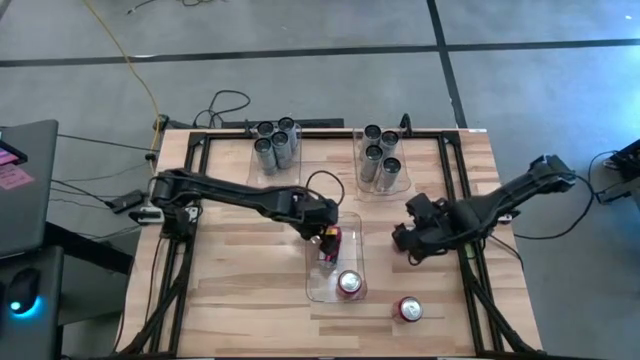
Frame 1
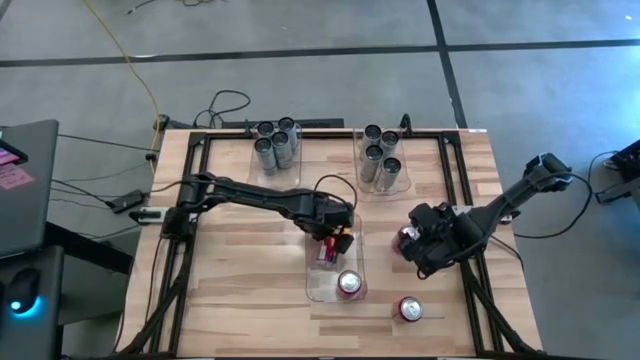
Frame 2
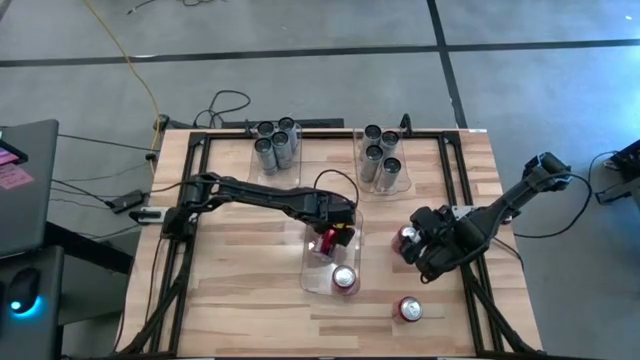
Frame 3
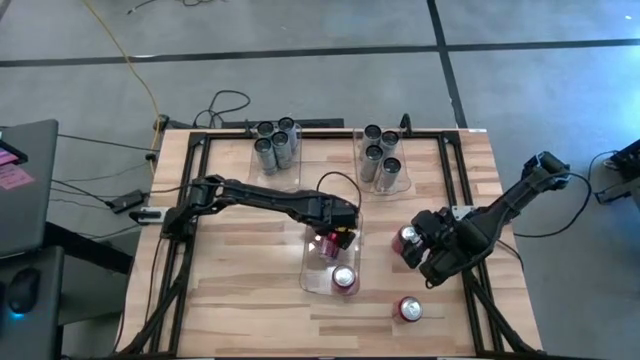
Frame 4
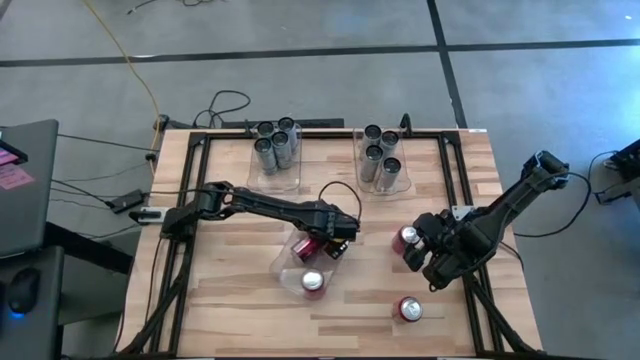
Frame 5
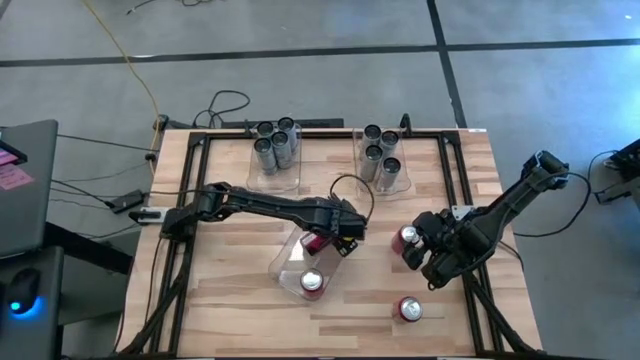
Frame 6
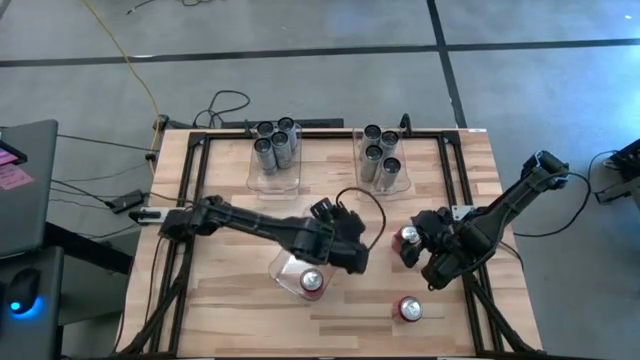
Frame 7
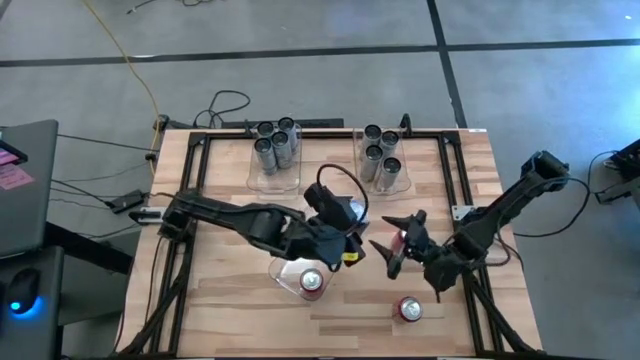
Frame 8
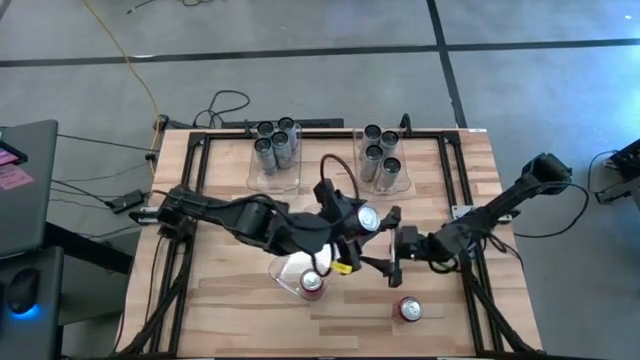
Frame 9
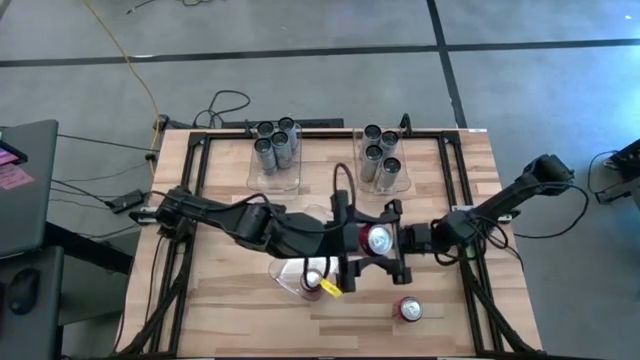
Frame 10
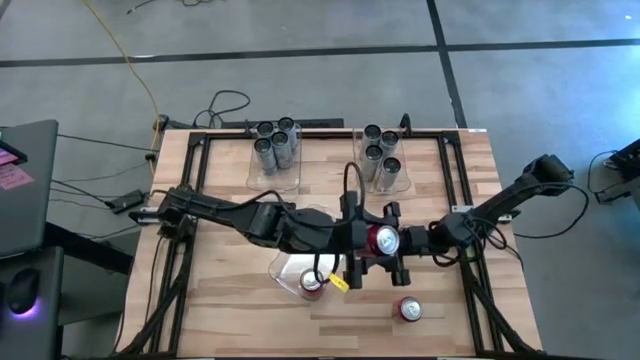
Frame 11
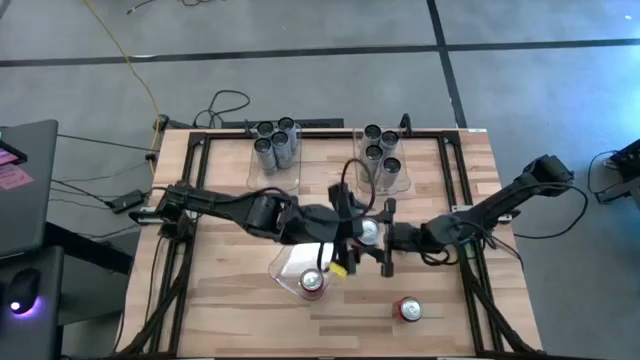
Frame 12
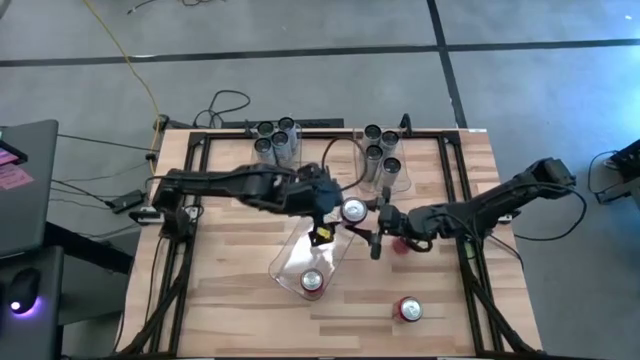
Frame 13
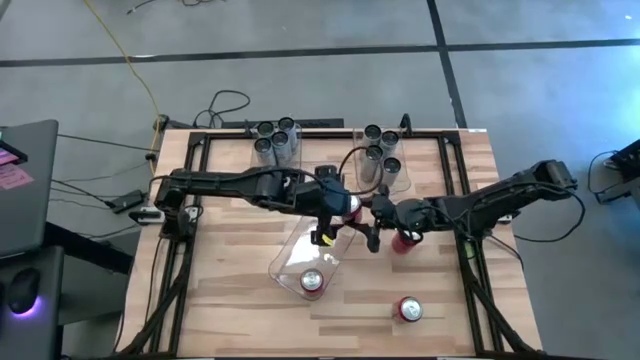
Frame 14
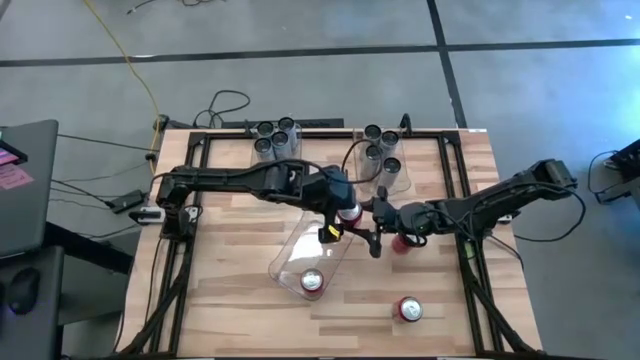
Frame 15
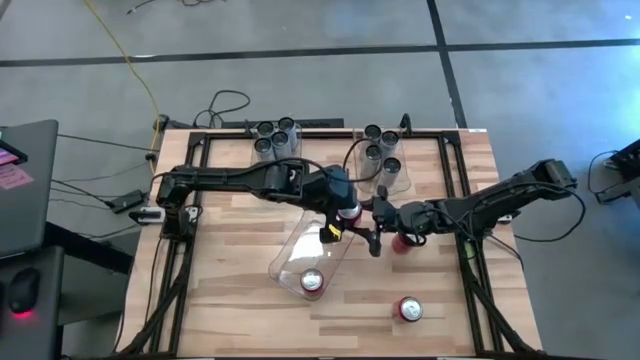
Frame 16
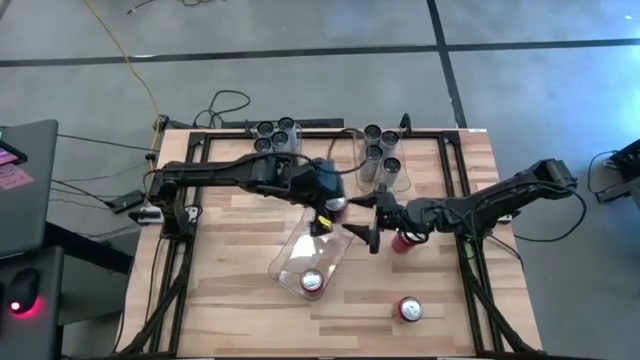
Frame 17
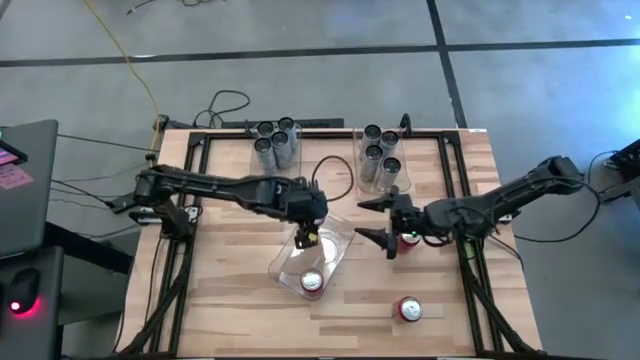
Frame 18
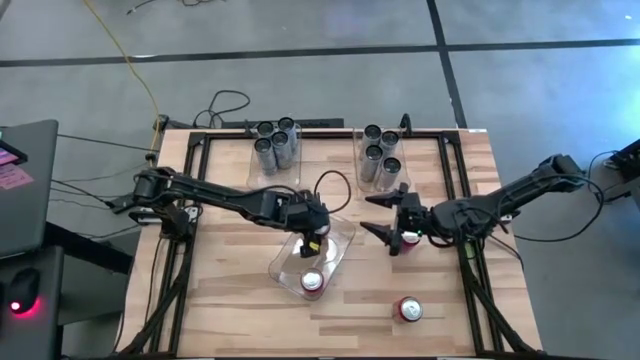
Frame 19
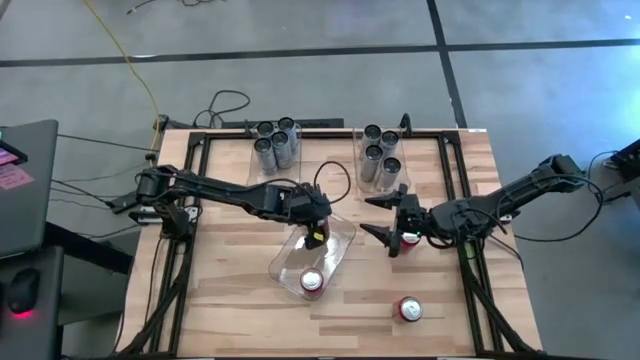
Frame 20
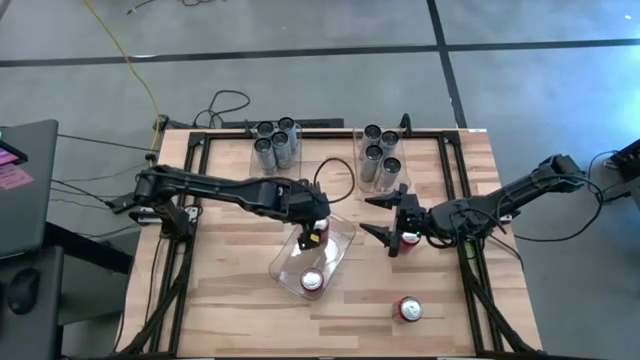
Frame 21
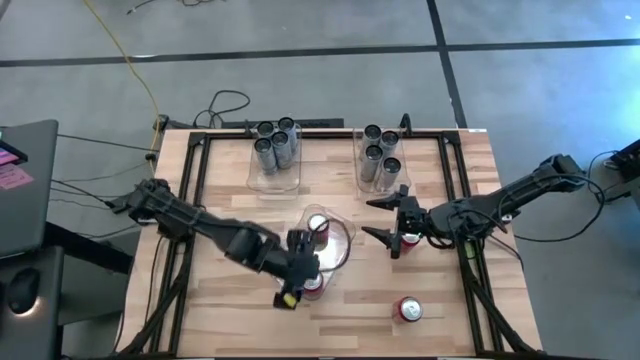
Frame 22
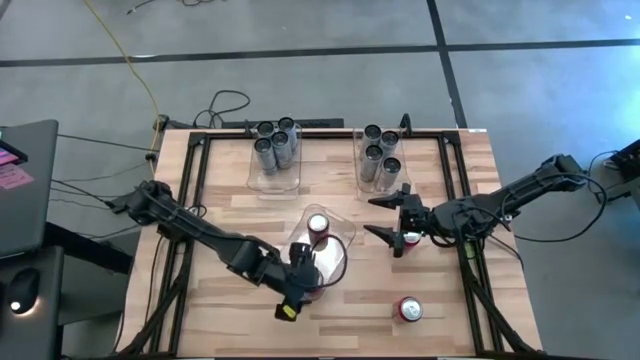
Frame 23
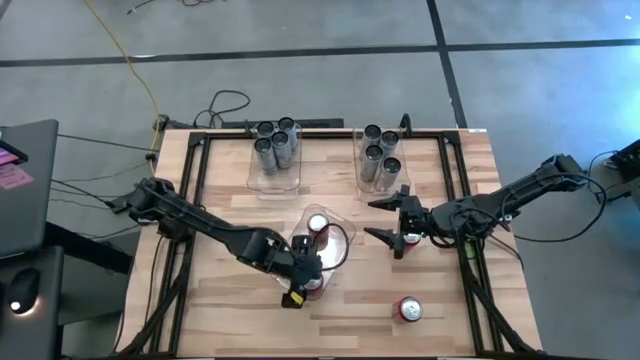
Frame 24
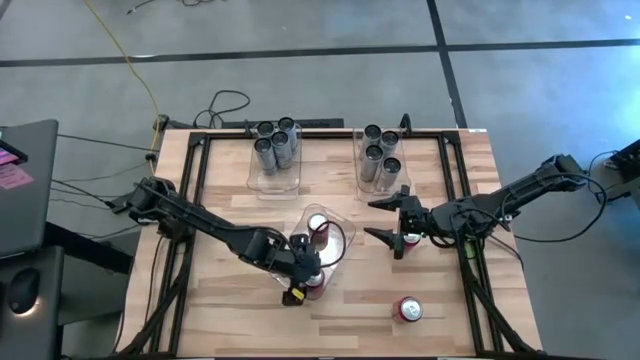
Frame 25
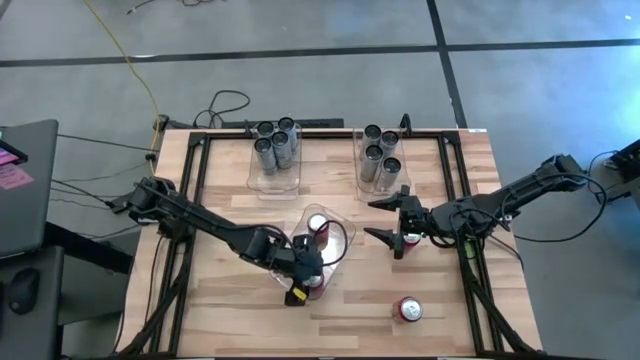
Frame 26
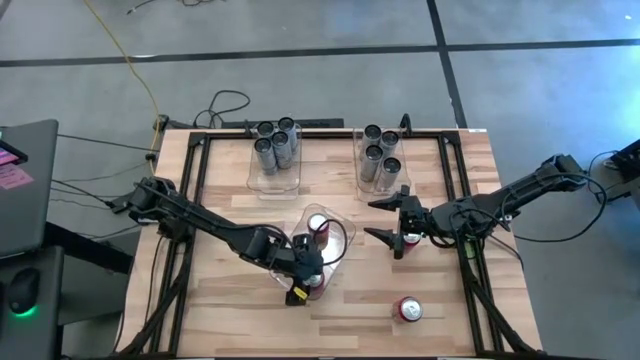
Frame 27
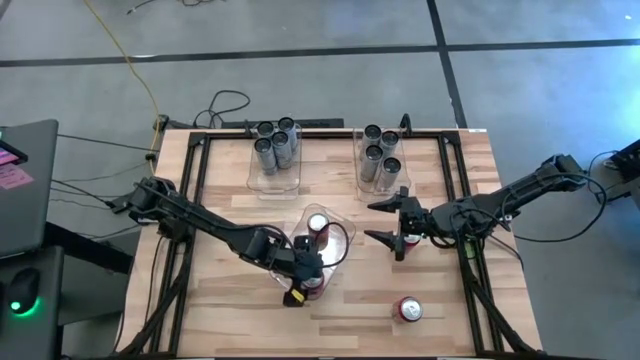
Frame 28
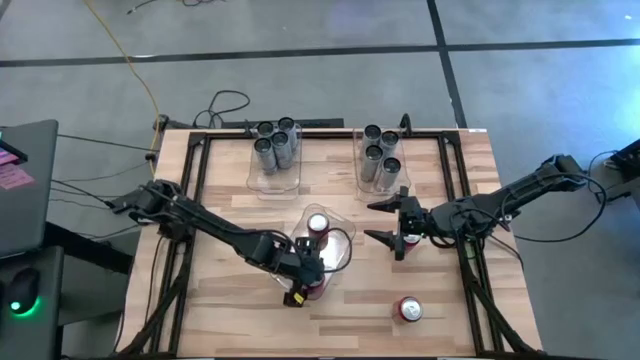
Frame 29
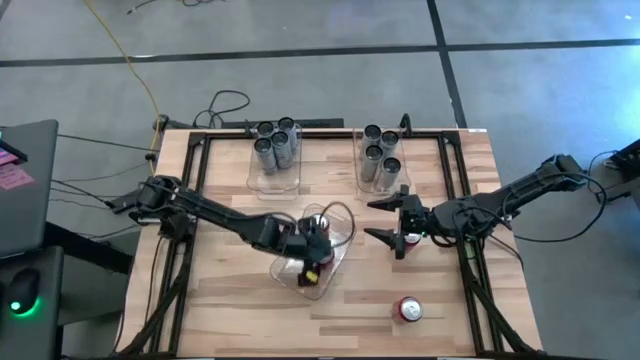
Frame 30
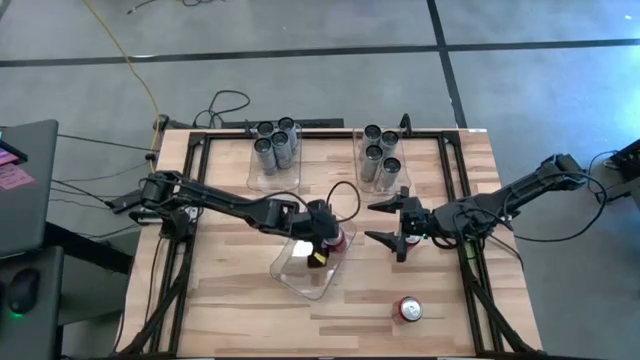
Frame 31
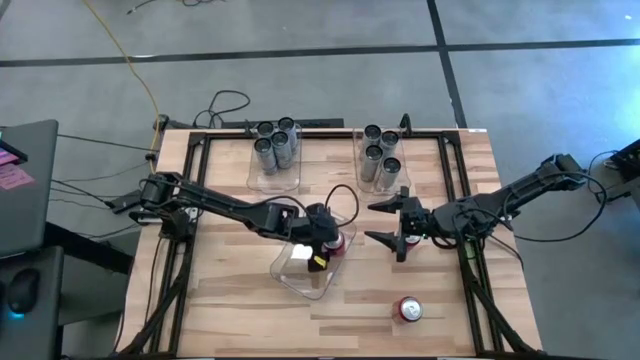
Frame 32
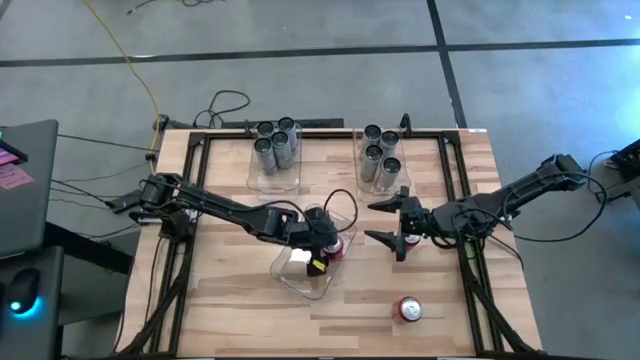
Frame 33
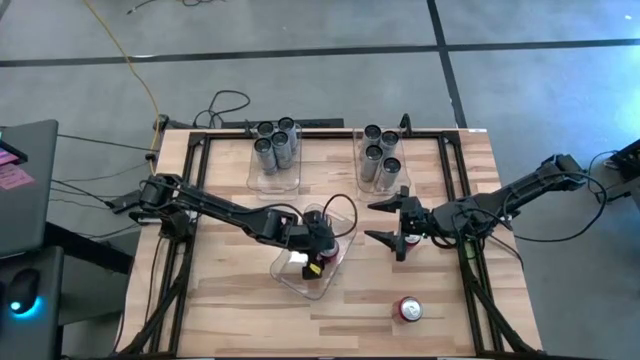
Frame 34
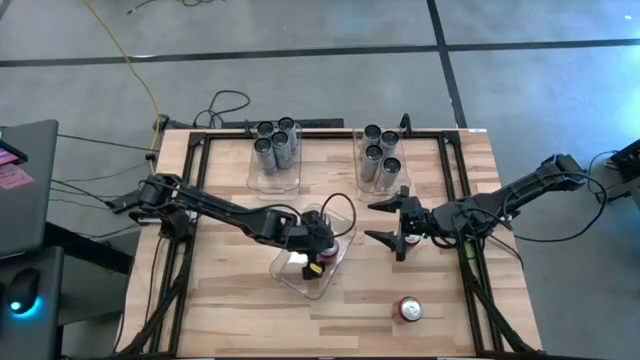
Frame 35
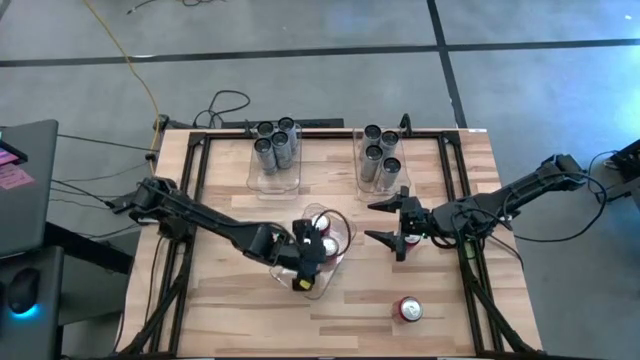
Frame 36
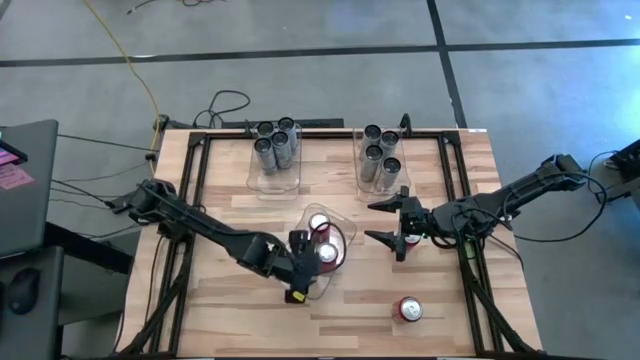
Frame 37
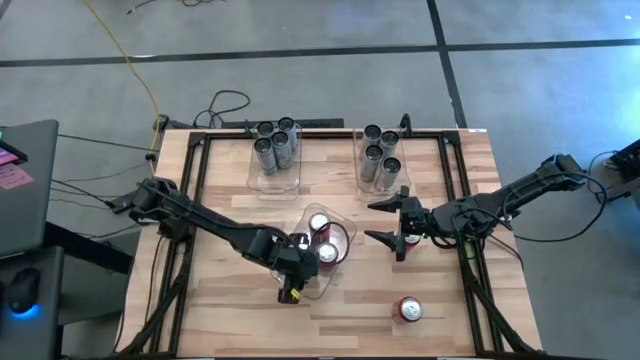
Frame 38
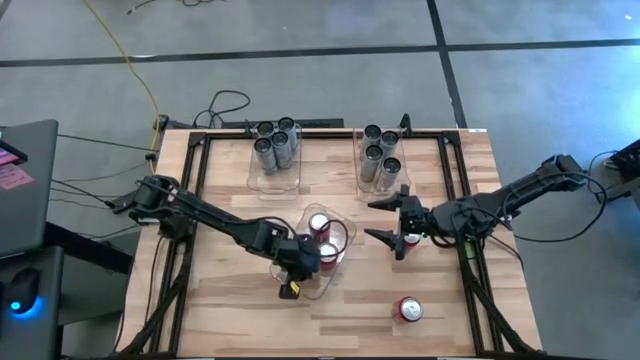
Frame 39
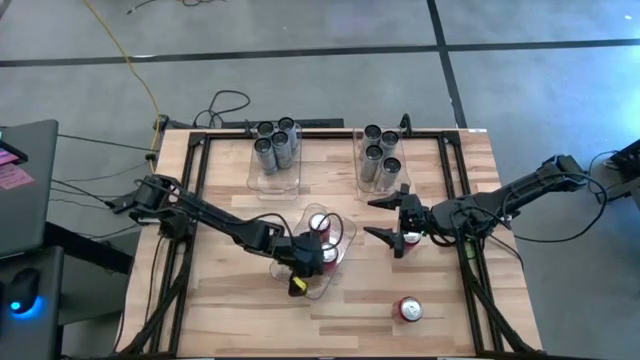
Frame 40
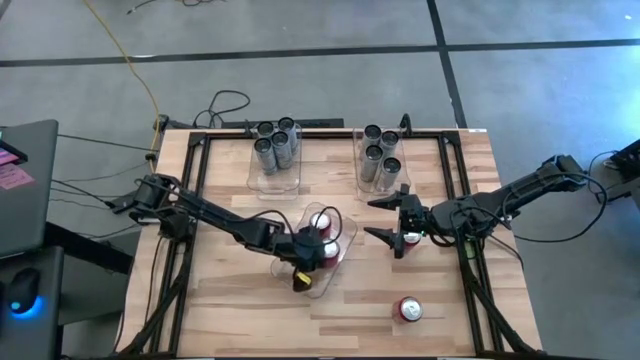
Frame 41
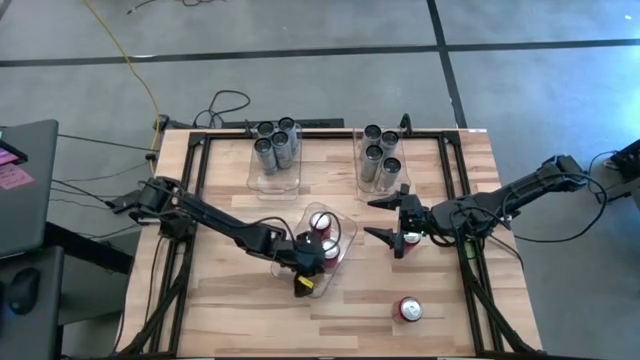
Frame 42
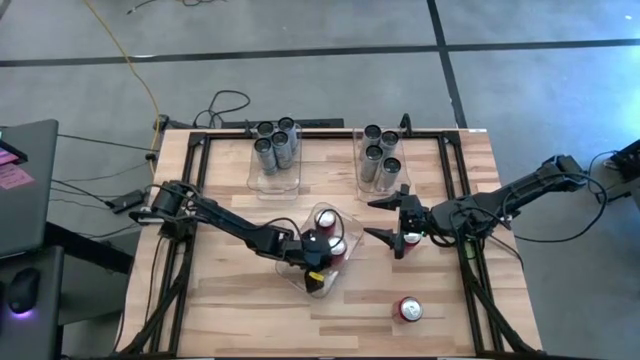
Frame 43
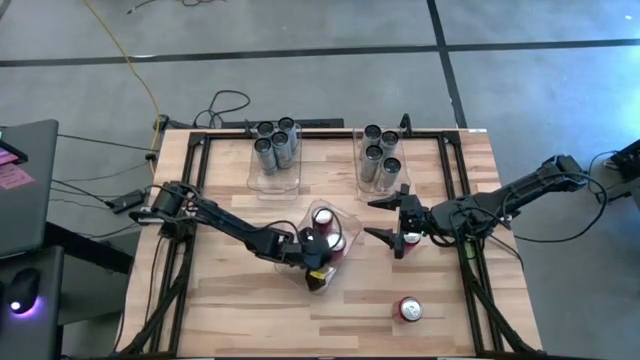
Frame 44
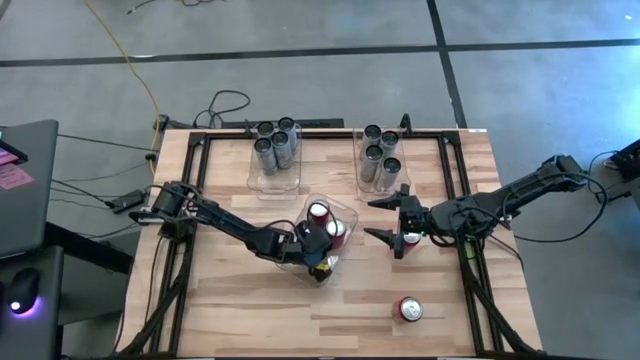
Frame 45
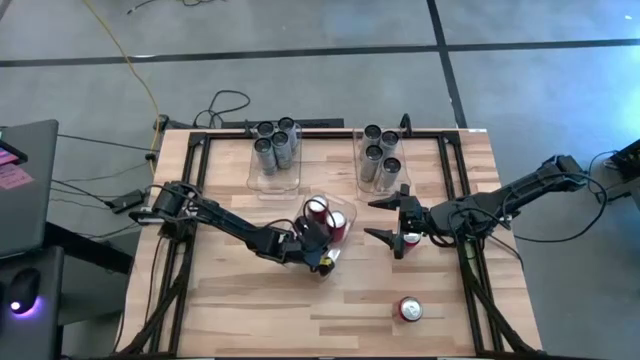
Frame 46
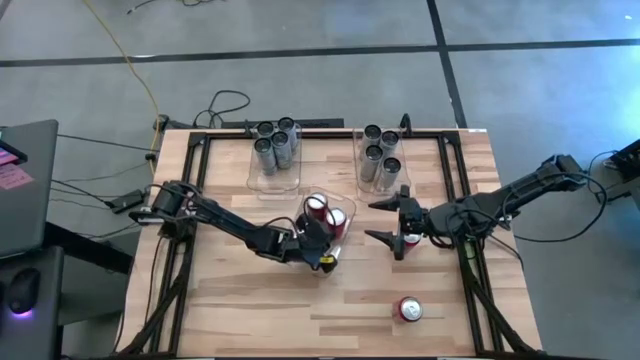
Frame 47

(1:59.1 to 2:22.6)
Task: Sort soda cans
Adjust the red soda cans in the center transparent bin
